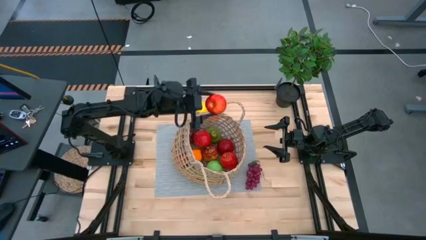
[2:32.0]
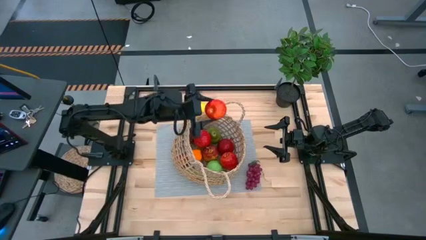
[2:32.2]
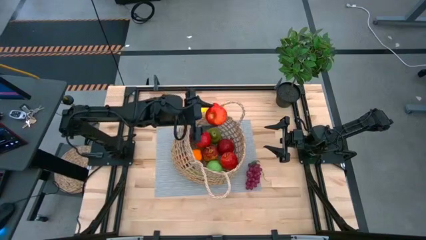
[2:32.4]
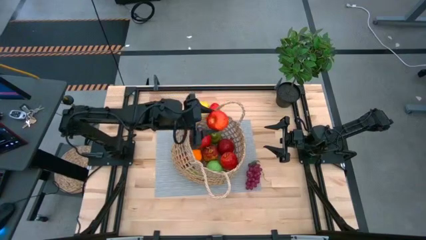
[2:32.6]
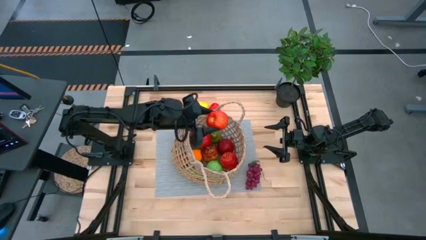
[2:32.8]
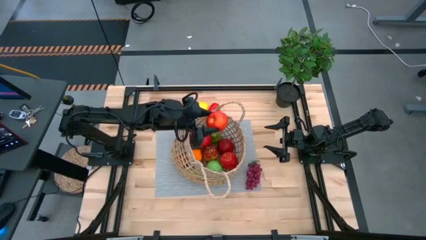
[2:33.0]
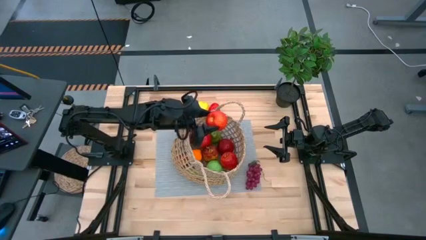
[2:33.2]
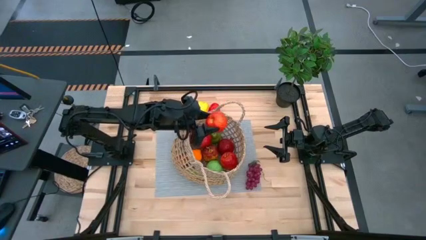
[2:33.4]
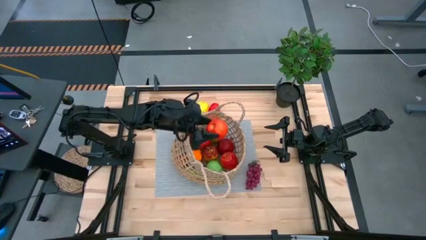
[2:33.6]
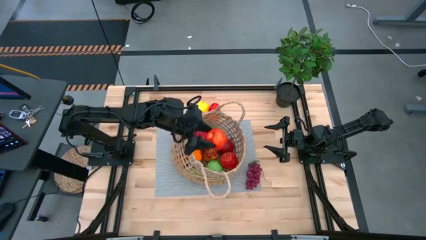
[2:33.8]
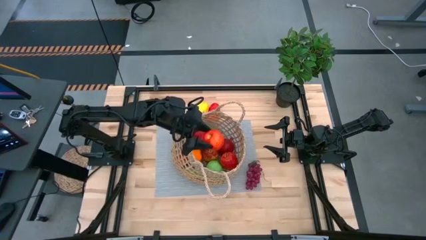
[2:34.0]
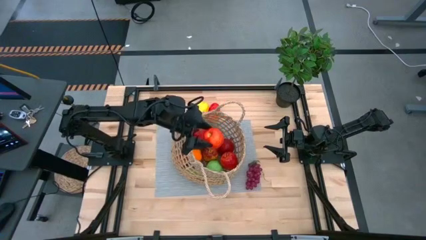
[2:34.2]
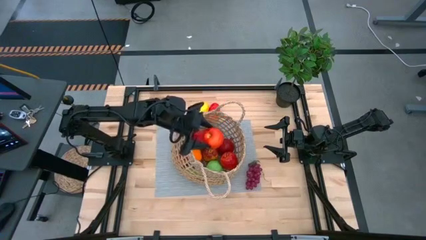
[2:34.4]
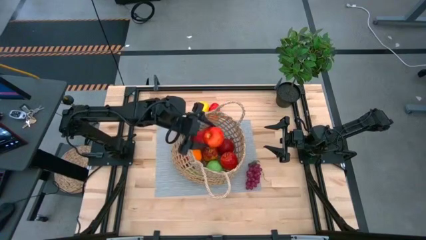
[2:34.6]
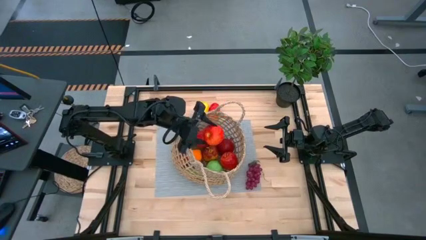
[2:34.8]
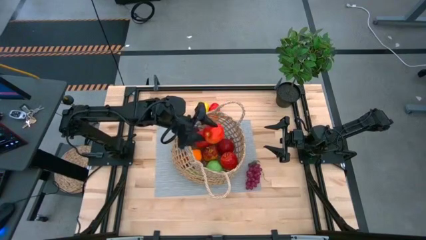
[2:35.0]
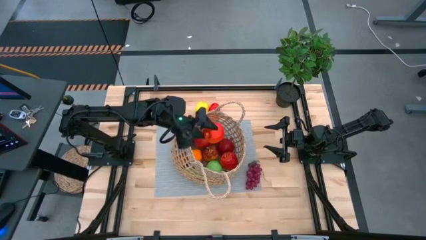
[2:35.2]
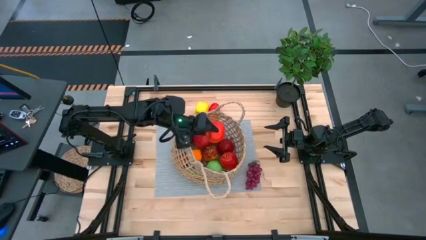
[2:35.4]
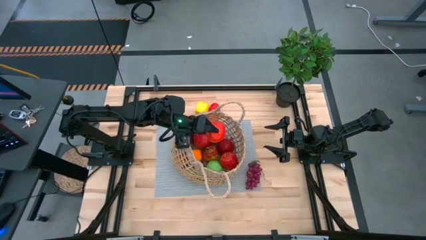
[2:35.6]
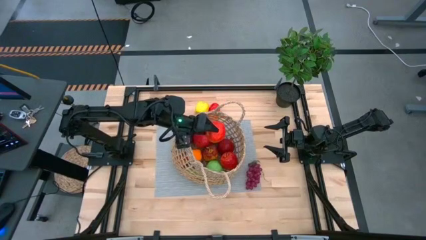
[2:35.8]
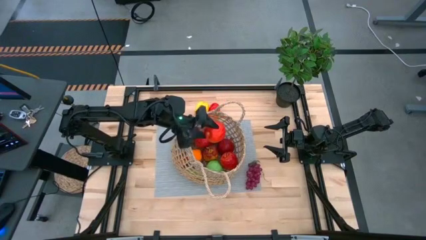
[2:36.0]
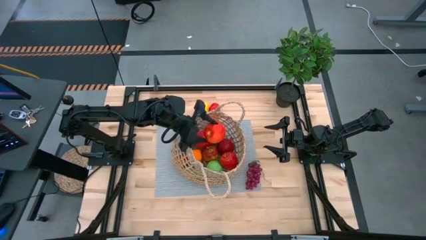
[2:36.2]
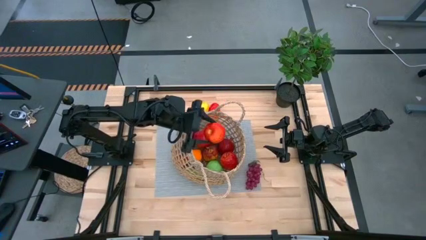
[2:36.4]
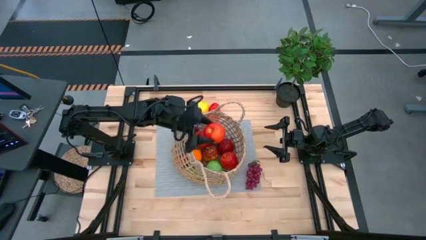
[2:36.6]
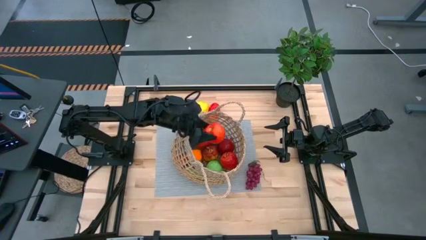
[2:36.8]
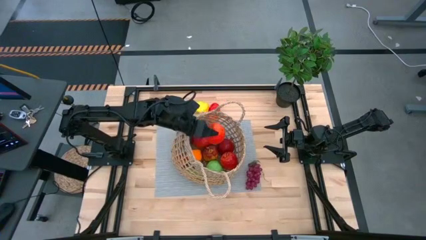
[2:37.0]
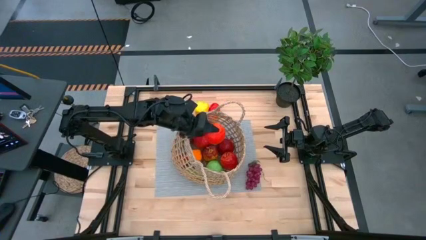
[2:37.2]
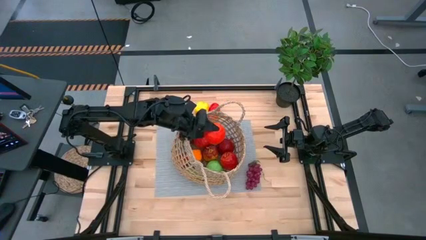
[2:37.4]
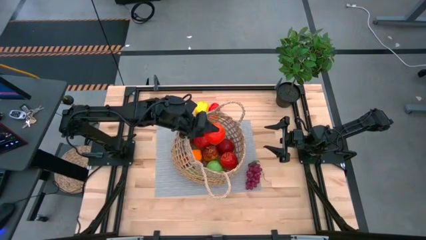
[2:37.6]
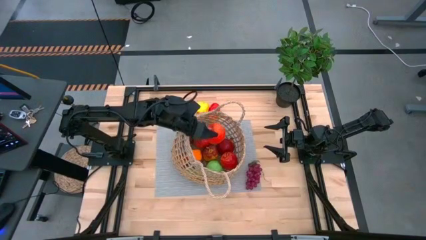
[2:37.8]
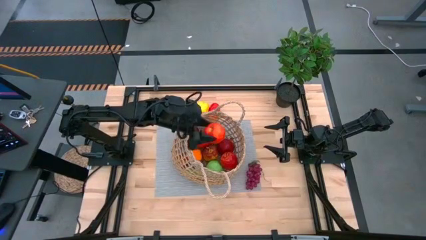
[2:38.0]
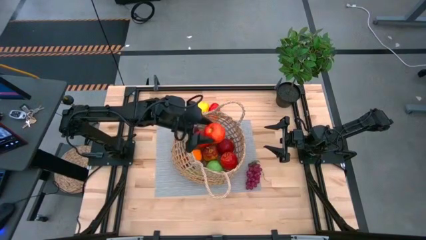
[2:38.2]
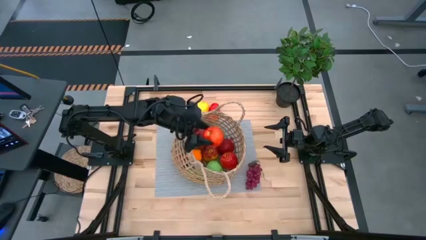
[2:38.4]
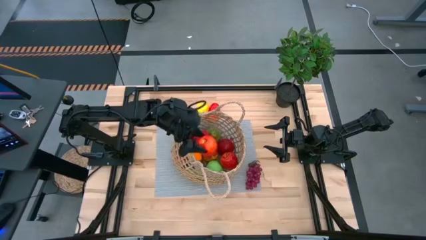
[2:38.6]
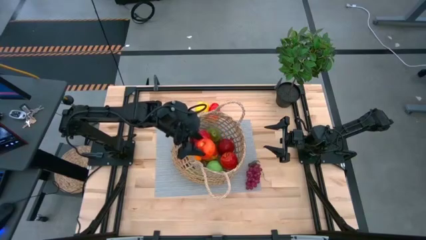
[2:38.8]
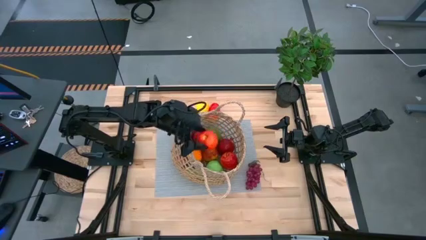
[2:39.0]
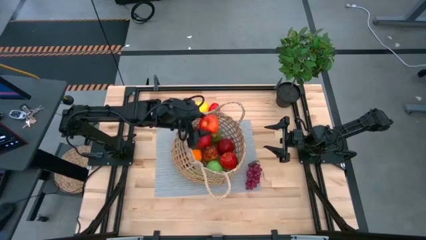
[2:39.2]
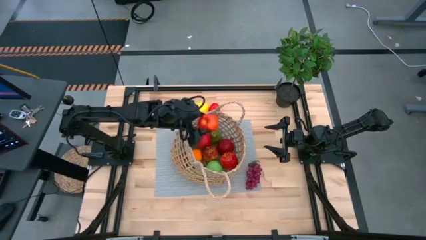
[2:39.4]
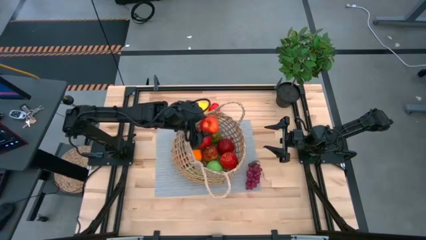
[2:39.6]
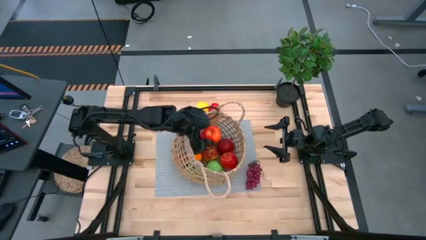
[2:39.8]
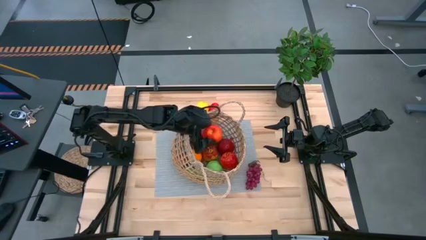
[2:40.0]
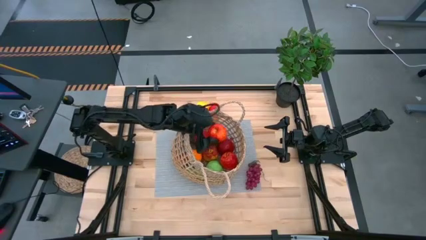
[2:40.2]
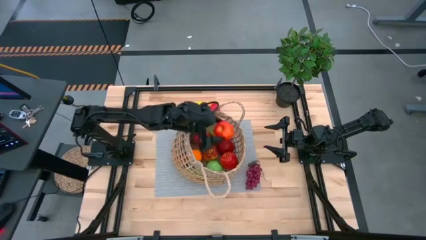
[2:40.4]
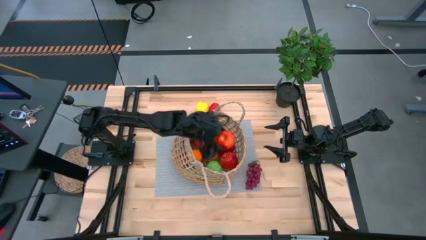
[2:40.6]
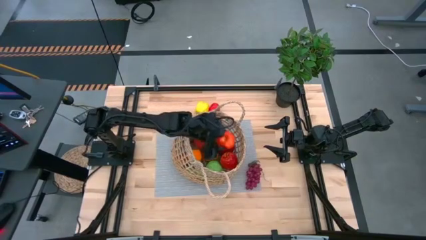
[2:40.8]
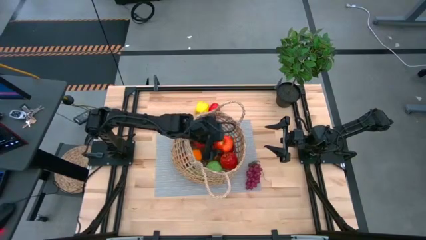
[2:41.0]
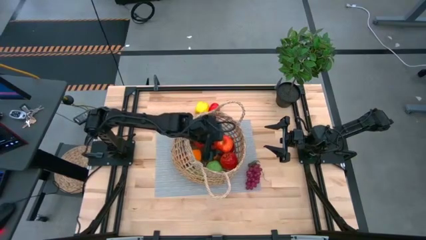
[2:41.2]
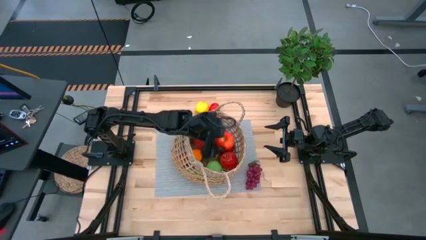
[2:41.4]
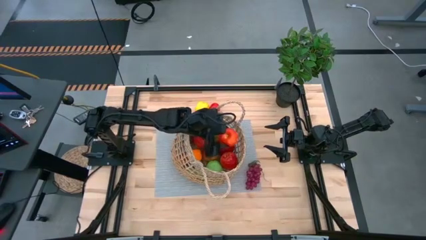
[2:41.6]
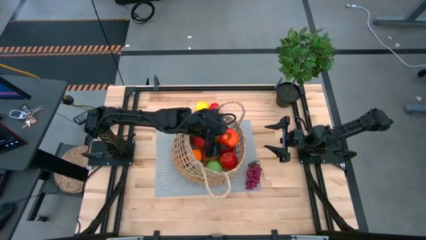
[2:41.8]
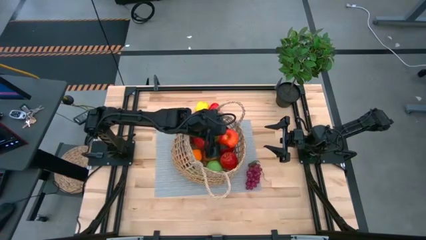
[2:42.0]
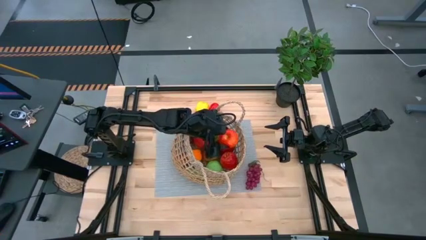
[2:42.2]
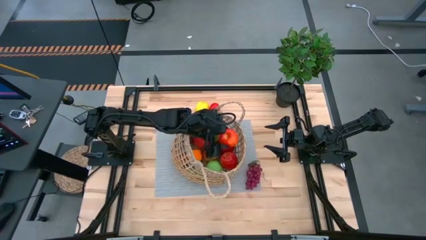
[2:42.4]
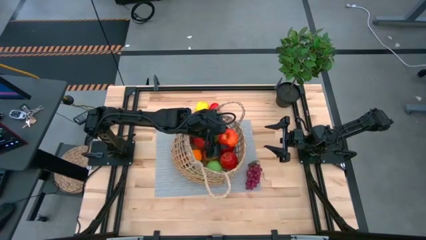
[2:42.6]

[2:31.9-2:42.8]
Task: Build produce basket
Put the red apple into the mesh basket

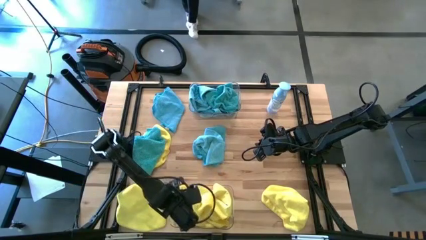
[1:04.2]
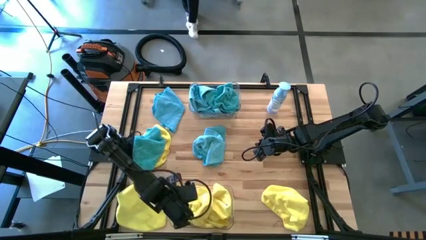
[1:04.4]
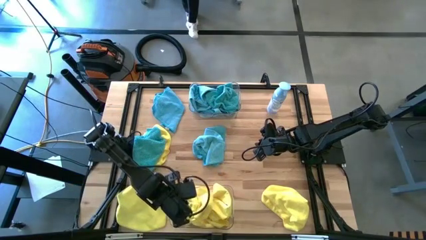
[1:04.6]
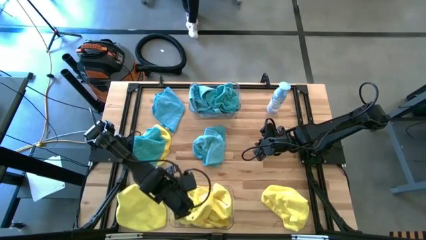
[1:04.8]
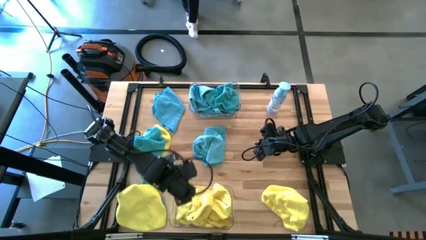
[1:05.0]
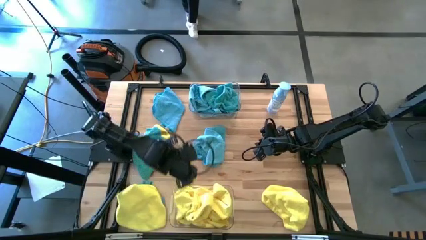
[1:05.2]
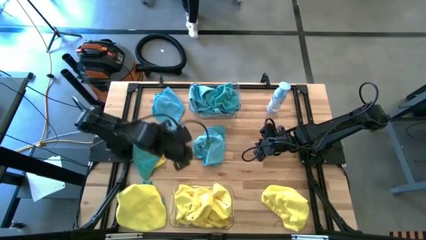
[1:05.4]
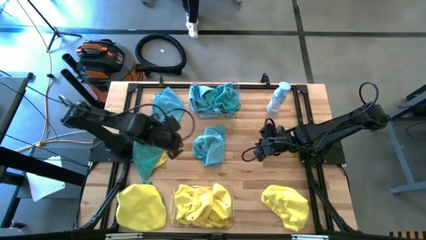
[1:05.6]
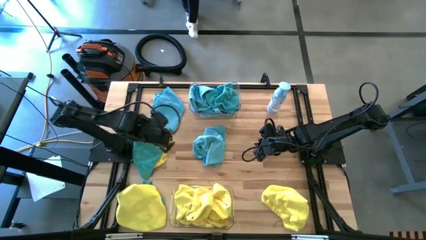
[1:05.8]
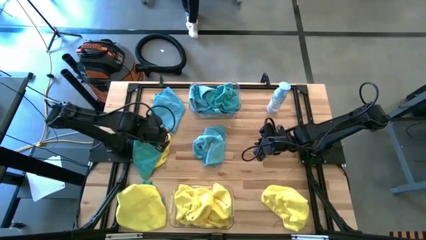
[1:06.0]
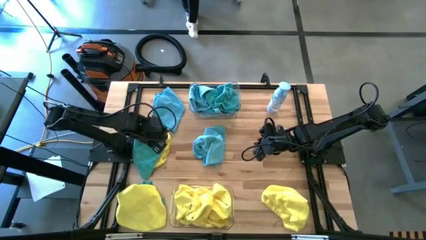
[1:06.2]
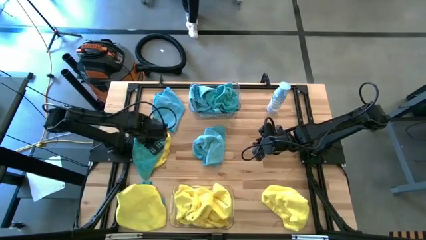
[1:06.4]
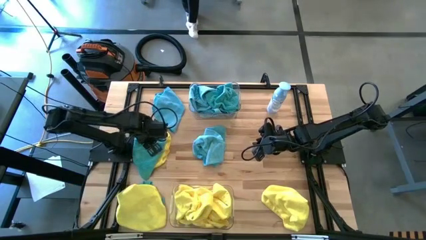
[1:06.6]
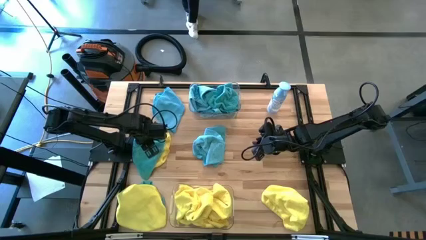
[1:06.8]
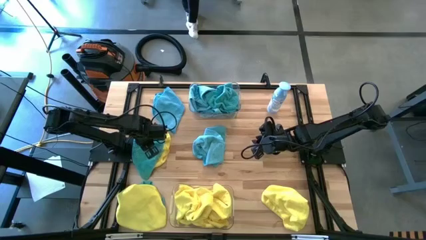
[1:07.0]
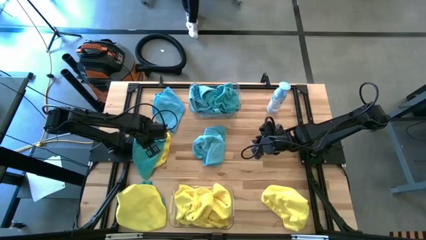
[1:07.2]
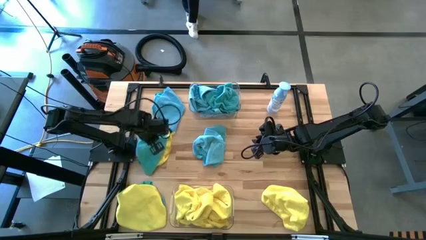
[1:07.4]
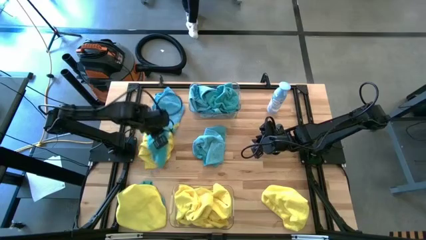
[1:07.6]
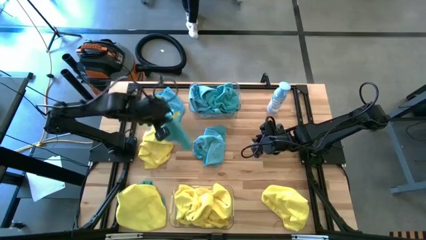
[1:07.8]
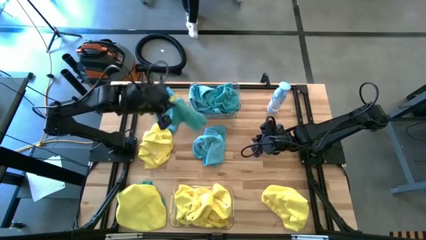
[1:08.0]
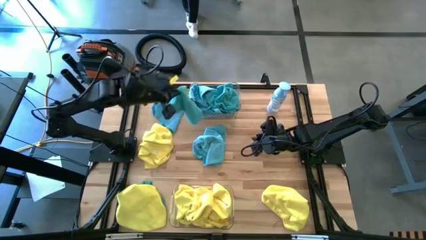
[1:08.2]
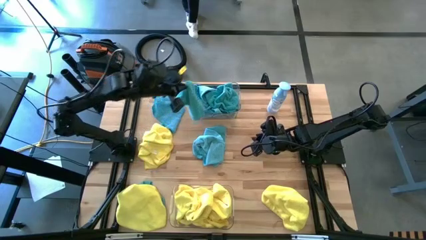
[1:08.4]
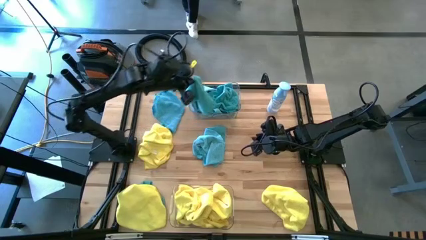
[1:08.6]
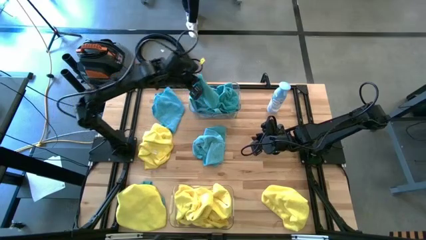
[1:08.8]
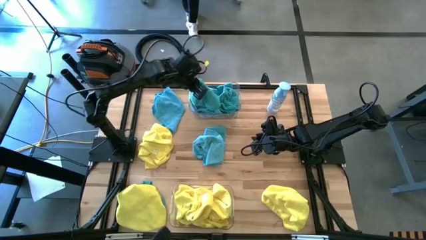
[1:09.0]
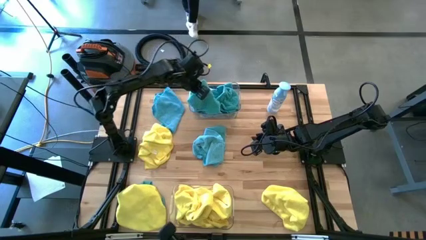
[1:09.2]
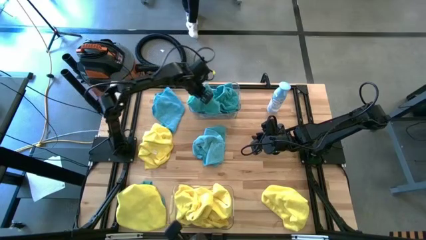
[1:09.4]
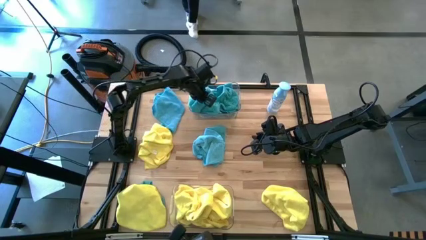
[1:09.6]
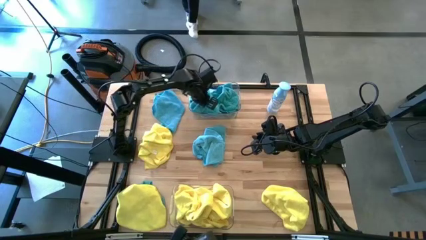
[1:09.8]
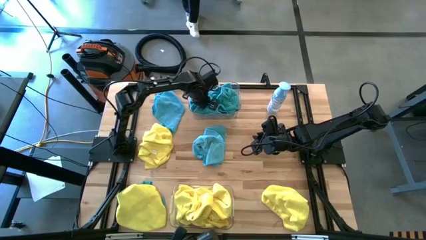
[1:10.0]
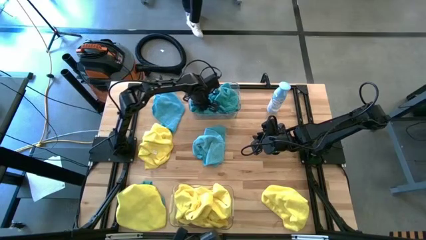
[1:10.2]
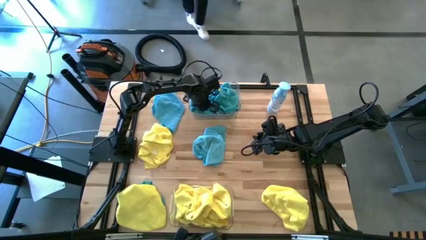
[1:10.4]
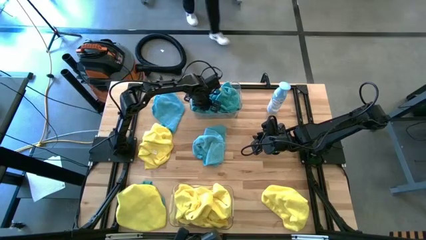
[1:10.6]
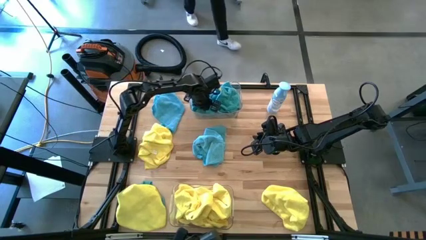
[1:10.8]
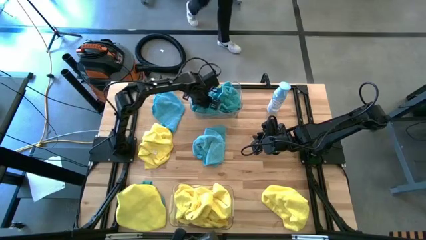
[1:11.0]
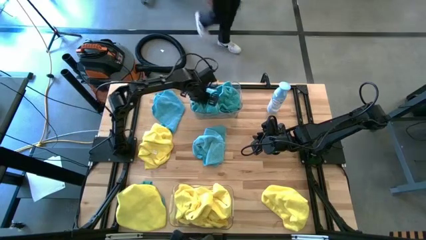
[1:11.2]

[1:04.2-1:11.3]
Task: Sort microfiber towel by color & place in baskets
Put the blue microfiber towel into the top transparent bin
